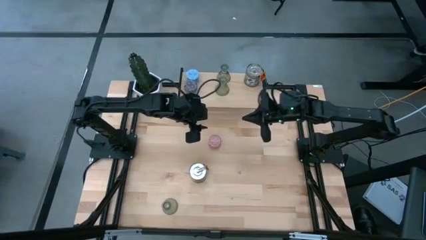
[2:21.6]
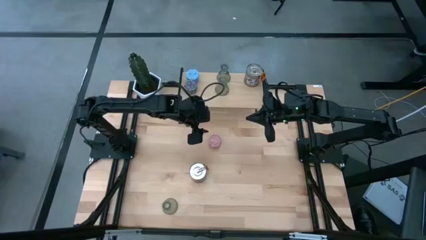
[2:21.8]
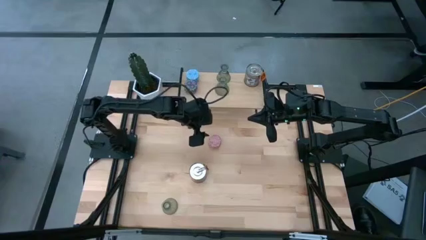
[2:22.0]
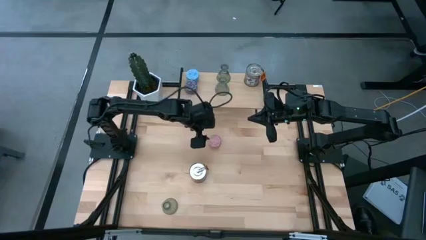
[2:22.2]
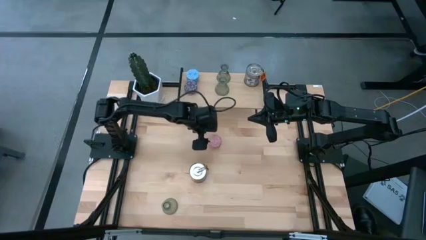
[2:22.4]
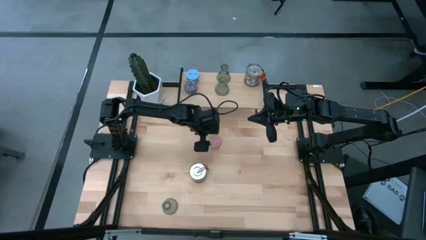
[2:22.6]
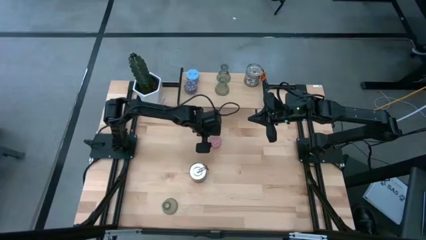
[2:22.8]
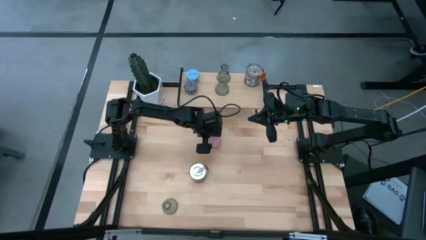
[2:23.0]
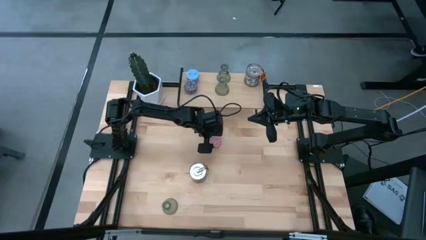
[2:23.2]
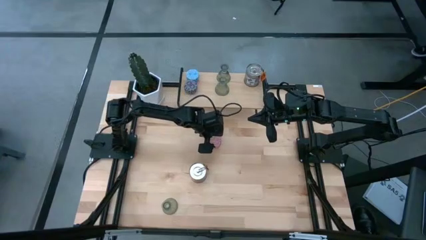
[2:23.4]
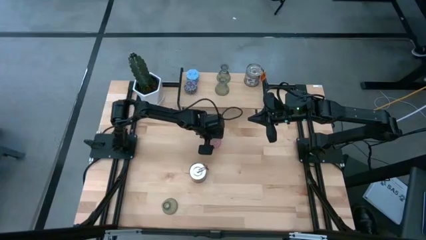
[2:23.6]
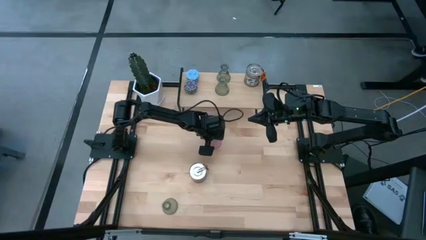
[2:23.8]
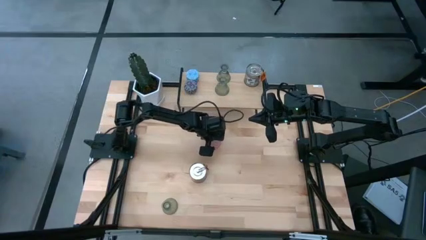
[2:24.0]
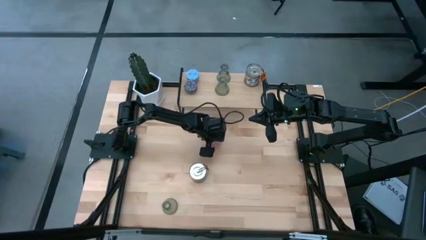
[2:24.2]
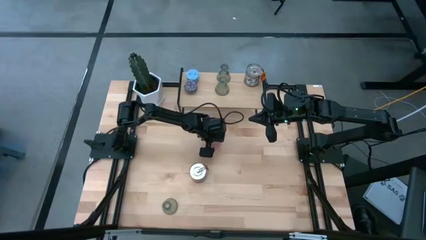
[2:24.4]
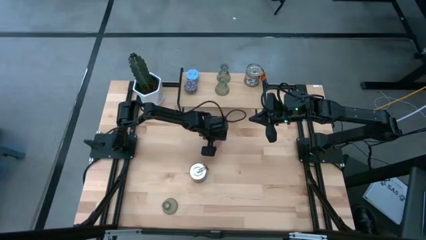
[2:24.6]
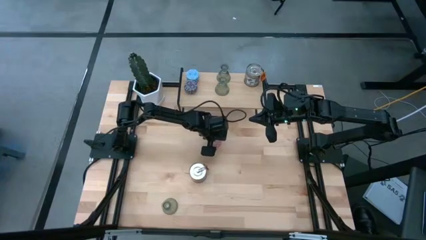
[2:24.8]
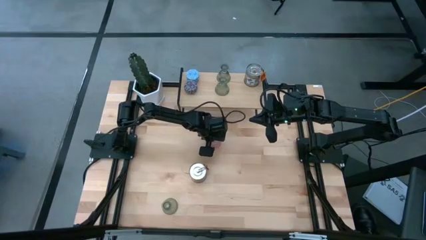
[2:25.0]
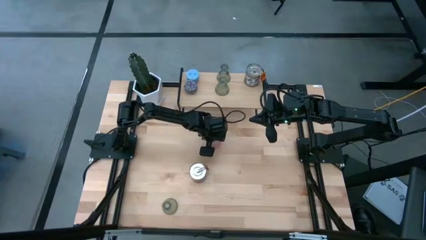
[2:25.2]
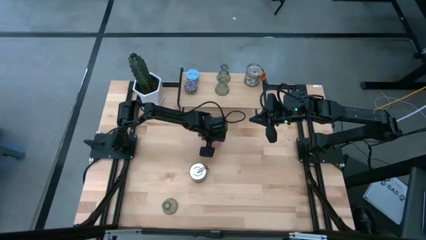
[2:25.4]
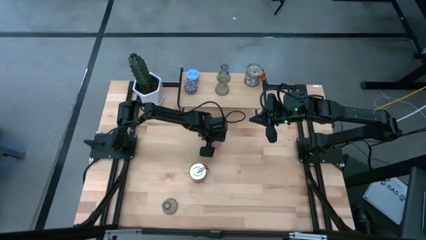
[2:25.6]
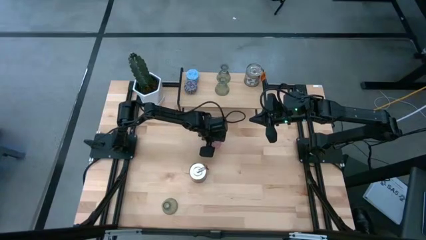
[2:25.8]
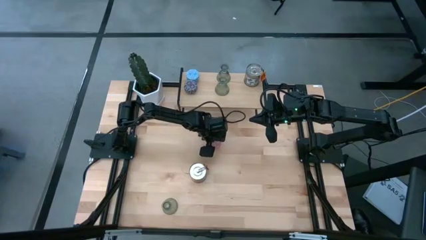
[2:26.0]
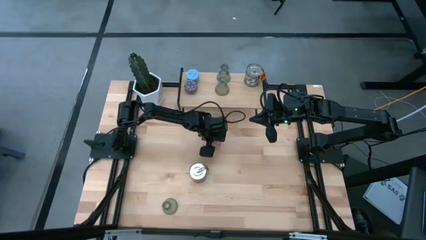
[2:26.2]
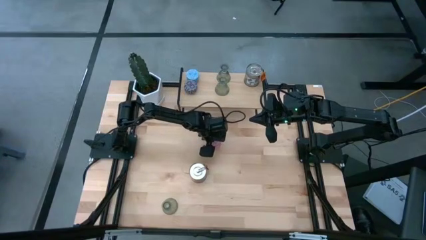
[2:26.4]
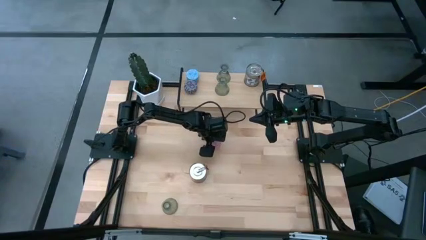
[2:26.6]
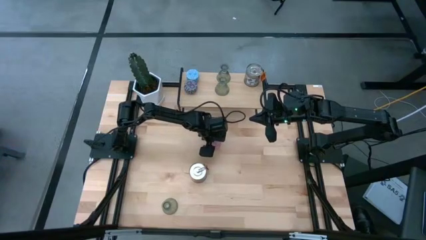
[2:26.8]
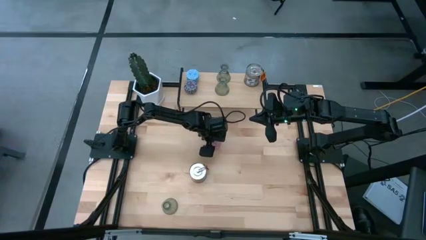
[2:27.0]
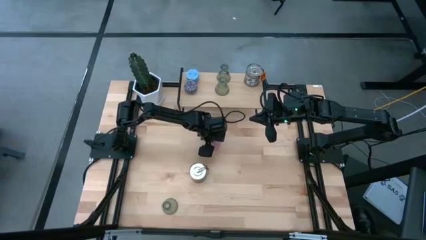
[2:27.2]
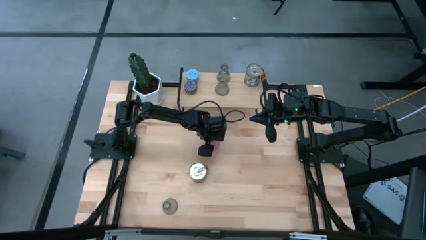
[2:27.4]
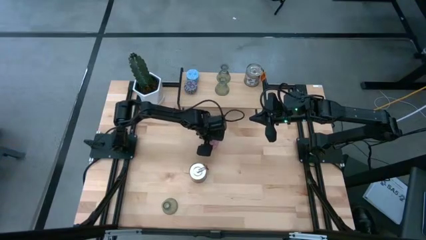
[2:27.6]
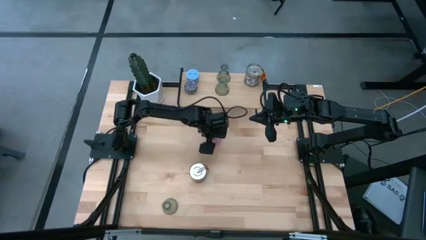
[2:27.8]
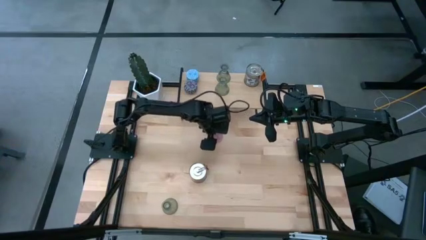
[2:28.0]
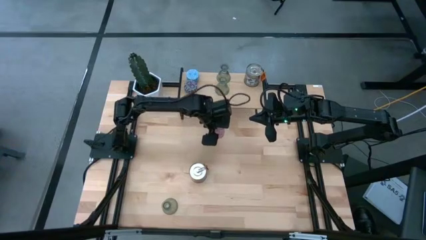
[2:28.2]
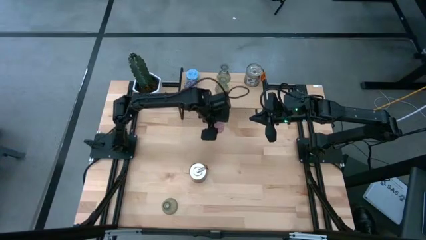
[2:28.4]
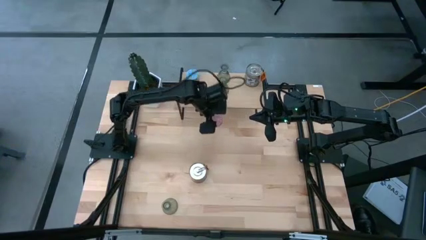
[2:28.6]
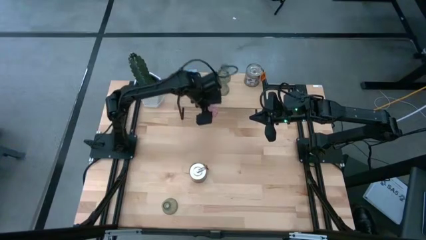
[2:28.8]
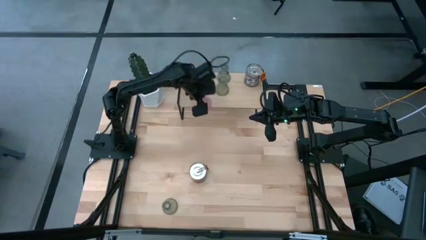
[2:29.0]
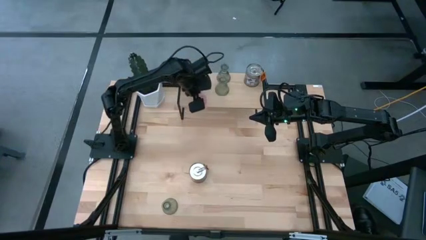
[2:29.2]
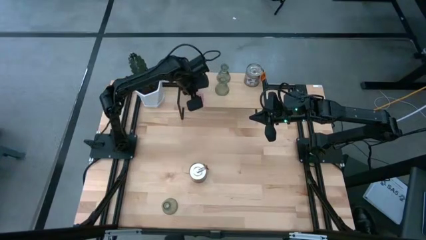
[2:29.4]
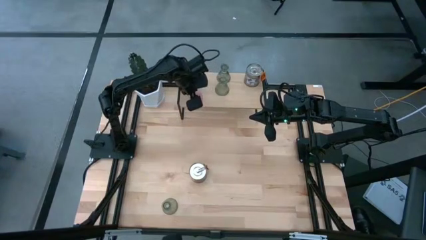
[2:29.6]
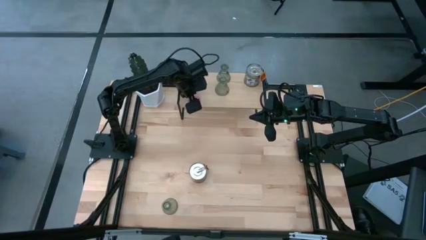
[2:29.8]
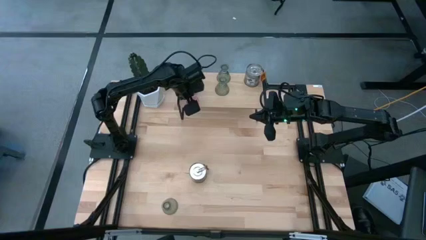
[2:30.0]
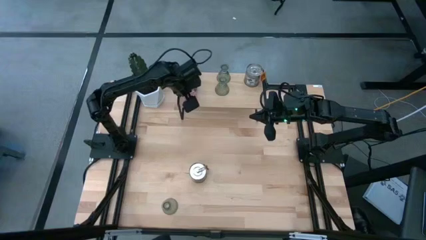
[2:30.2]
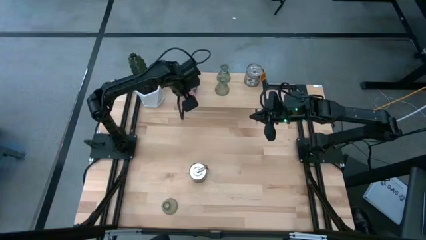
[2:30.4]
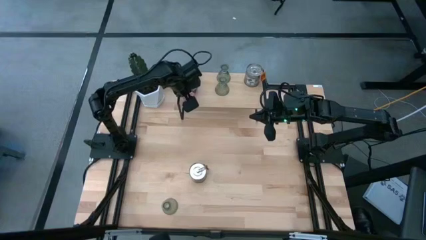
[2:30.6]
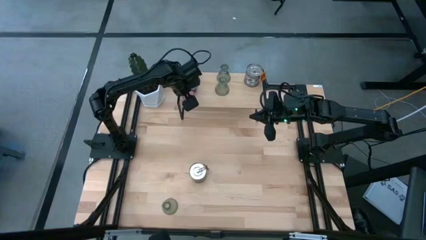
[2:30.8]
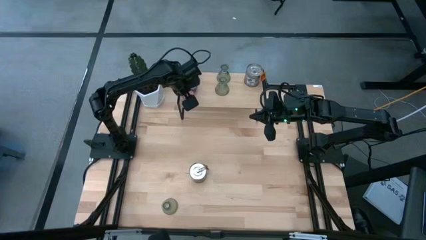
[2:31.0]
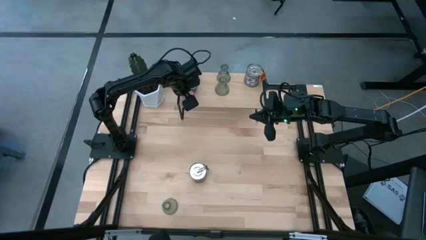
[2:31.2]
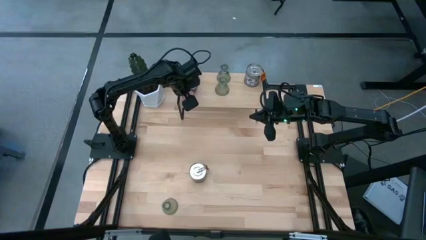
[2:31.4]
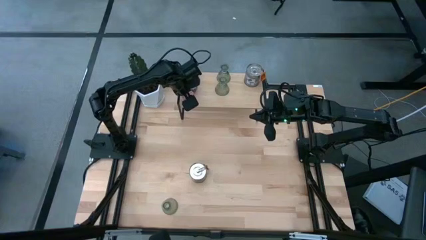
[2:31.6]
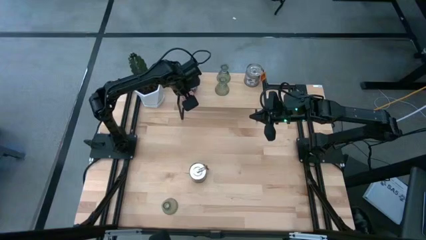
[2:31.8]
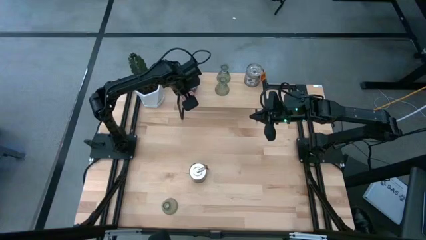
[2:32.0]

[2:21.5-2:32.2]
Task: Pick & Place candle stick holders
Put the pink scented candle aligned with the red scented candle on the shelf
